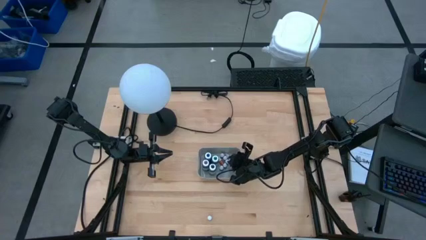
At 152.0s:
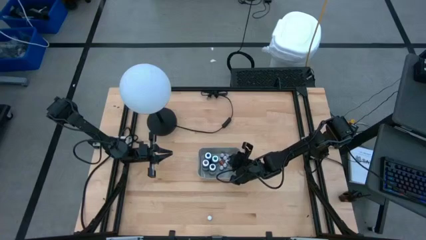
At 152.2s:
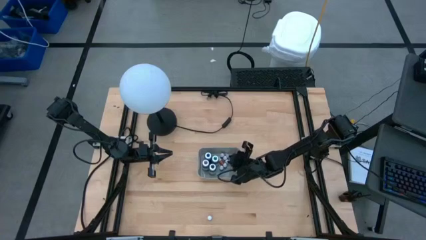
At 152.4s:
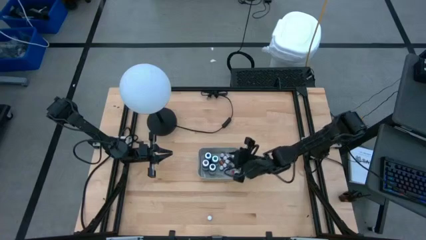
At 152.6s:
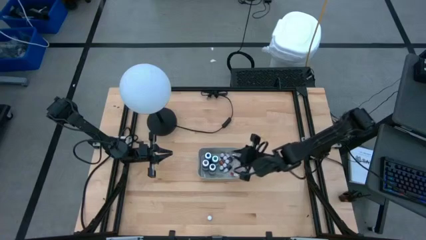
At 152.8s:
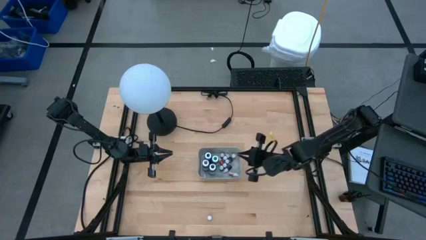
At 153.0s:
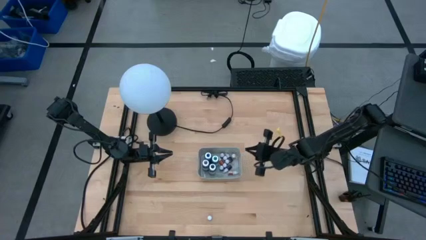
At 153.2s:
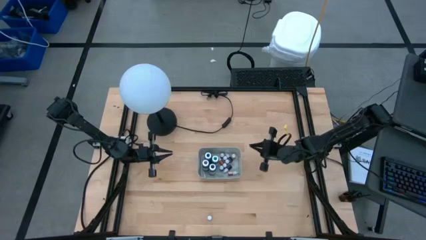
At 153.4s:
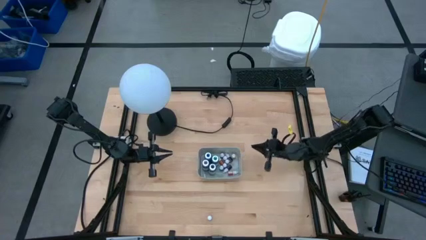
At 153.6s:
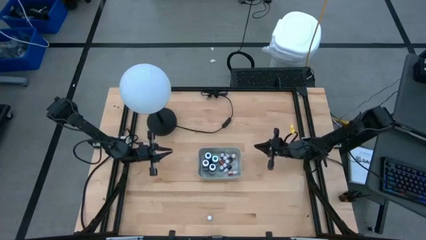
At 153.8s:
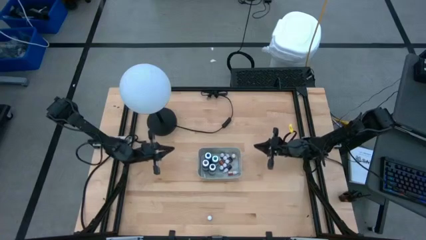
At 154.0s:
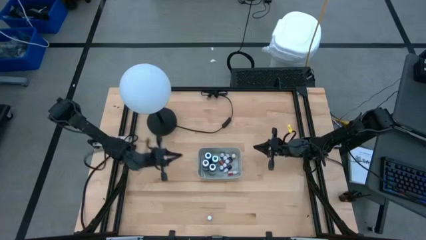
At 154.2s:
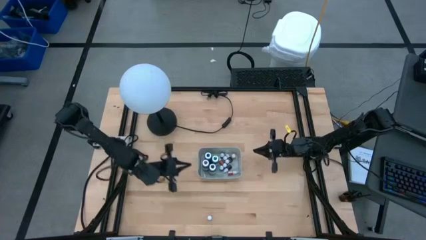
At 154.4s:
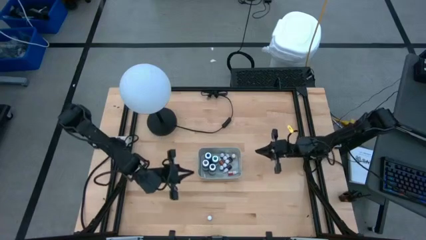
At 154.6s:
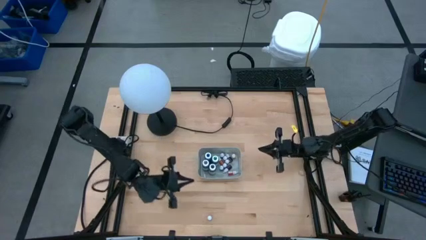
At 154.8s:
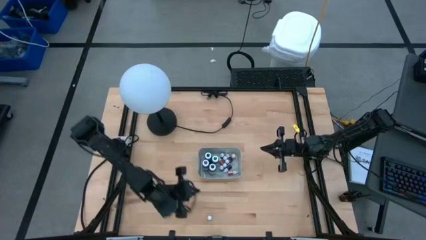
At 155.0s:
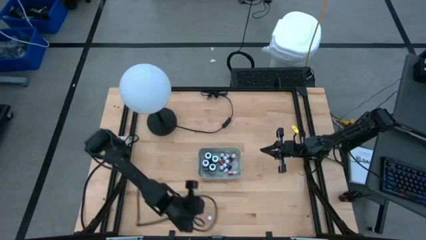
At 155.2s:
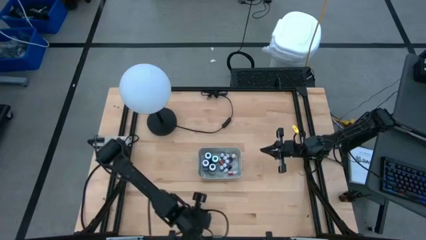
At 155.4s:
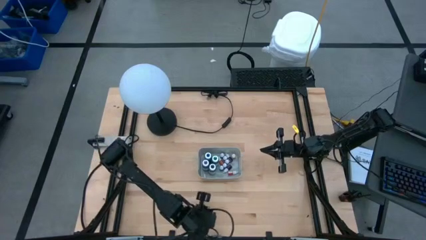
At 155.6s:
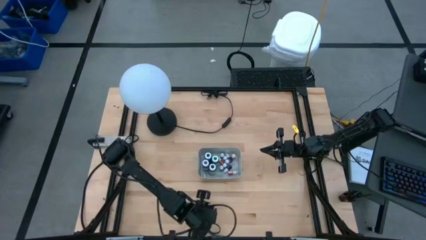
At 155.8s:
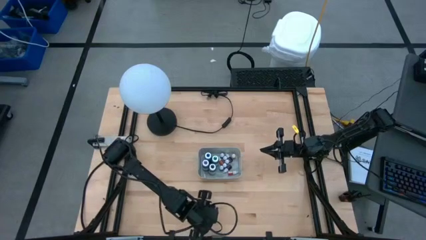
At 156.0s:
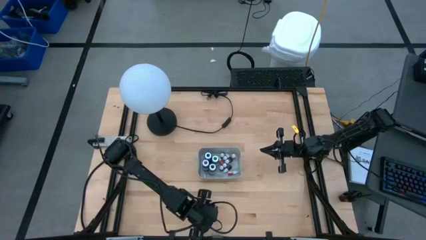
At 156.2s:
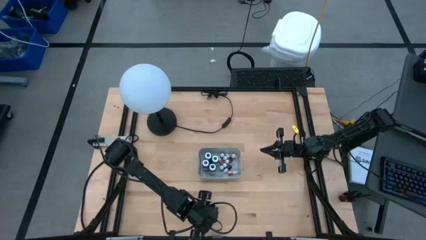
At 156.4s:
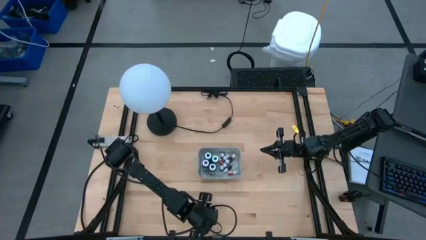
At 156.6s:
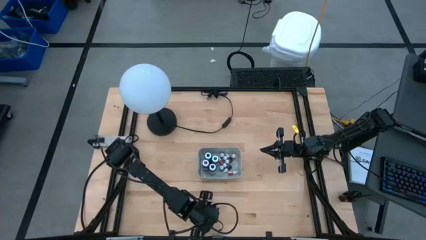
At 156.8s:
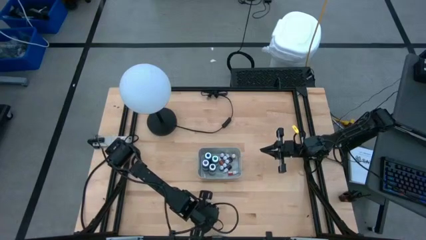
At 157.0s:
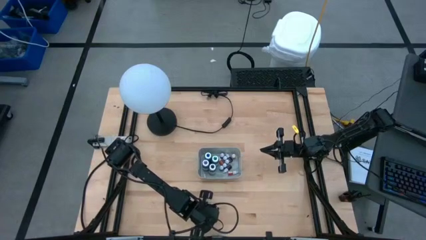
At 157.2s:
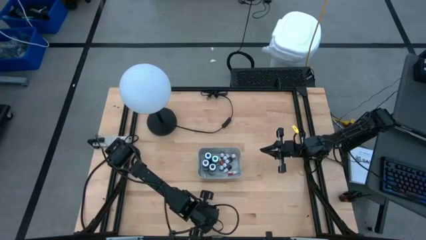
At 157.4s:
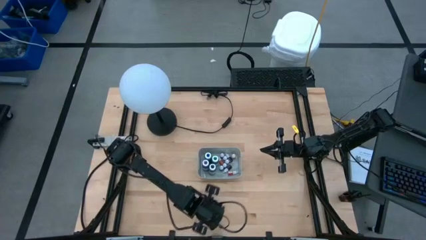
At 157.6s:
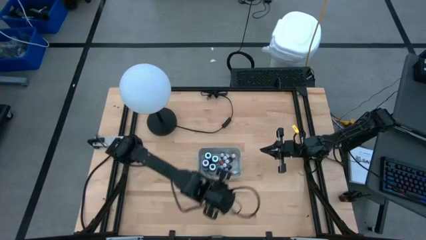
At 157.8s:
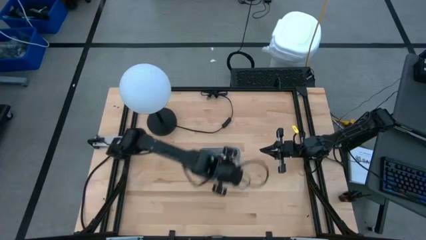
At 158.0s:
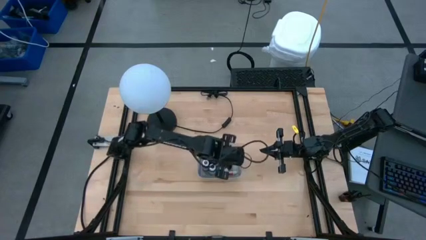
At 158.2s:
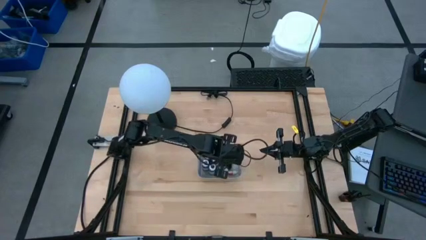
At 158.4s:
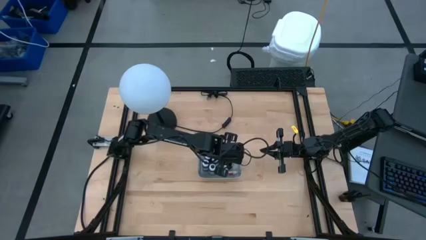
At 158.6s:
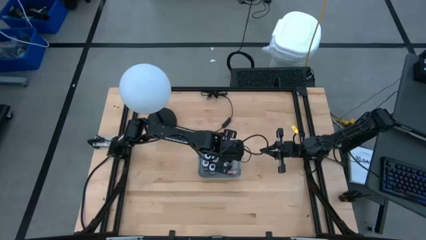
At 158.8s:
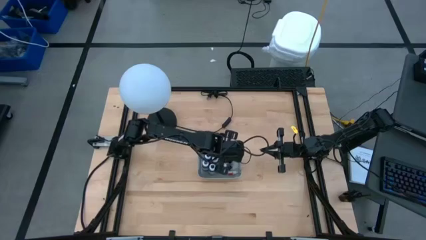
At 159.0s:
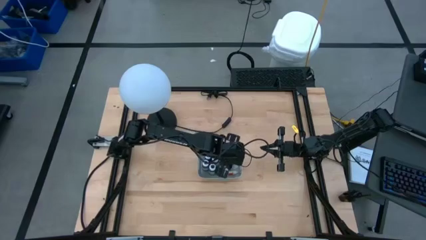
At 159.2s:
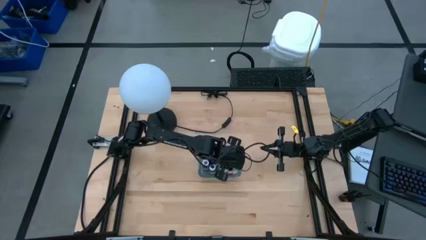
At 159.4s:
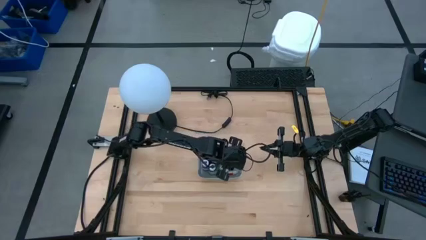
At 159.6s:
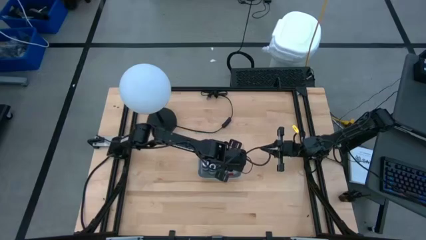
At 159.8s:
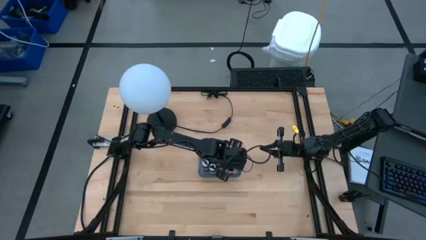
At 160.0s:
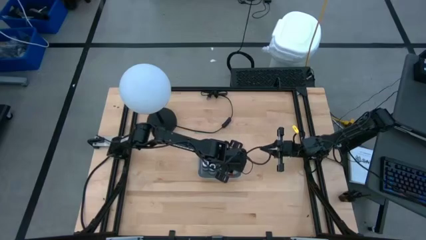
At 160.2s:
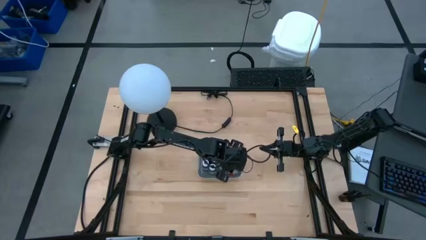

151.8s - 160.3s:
Task: Pick & Place food coloring
Put the small yellow food coloring bottle into the gray bin

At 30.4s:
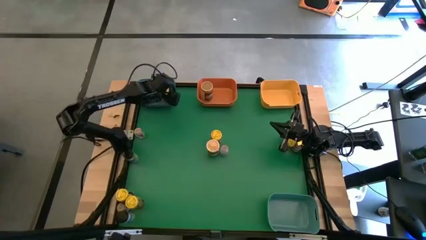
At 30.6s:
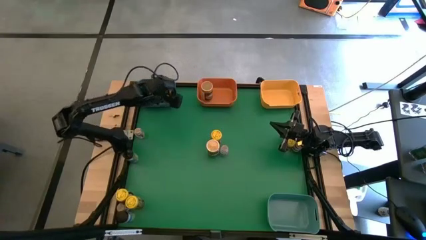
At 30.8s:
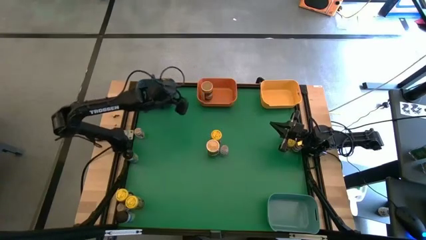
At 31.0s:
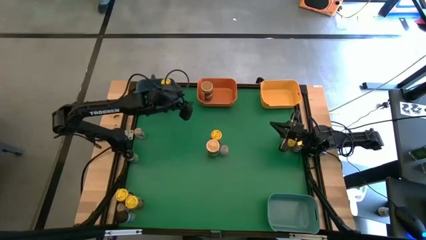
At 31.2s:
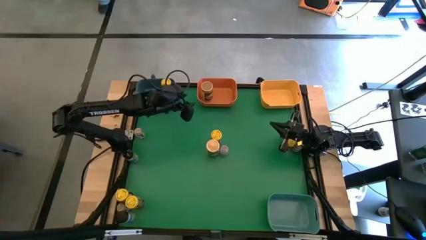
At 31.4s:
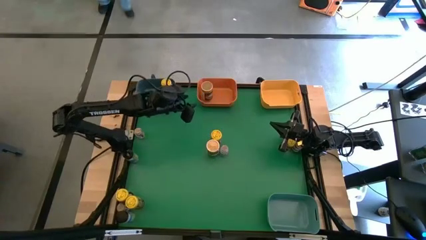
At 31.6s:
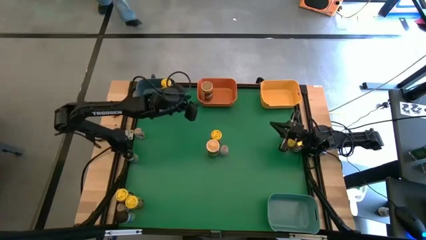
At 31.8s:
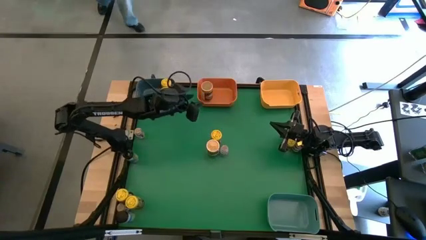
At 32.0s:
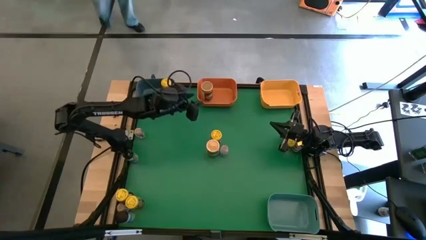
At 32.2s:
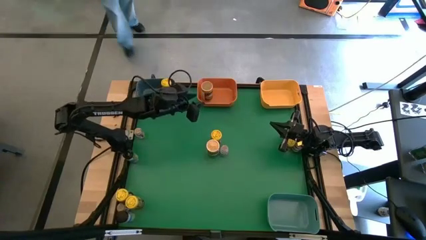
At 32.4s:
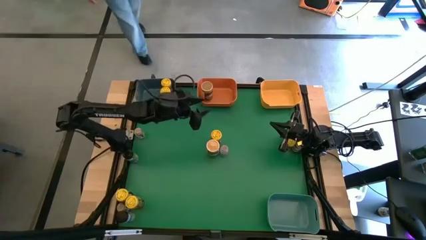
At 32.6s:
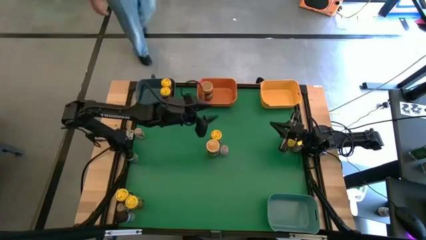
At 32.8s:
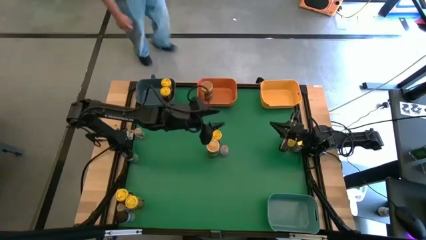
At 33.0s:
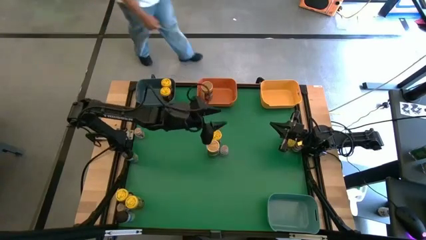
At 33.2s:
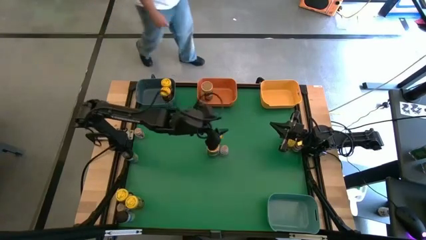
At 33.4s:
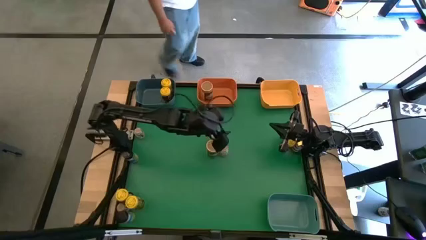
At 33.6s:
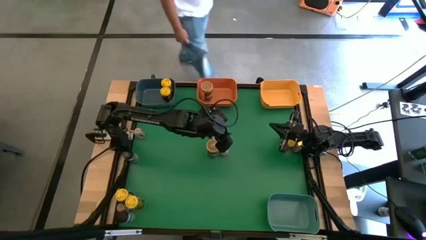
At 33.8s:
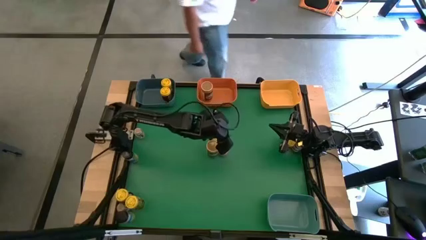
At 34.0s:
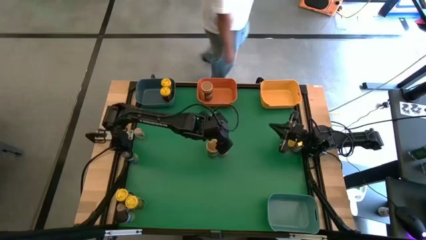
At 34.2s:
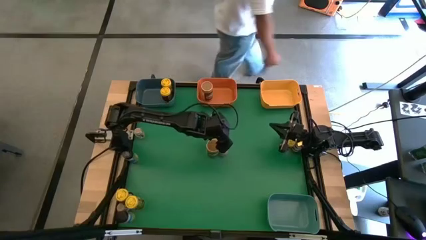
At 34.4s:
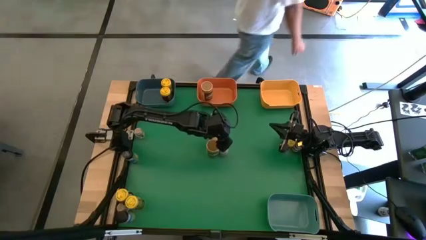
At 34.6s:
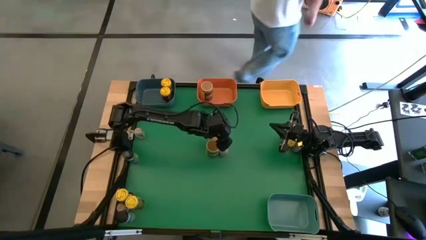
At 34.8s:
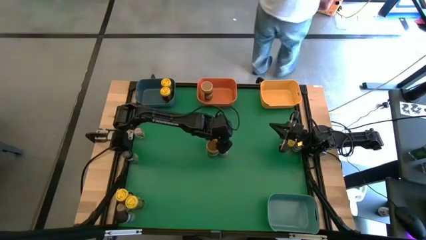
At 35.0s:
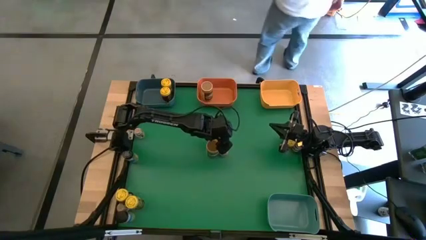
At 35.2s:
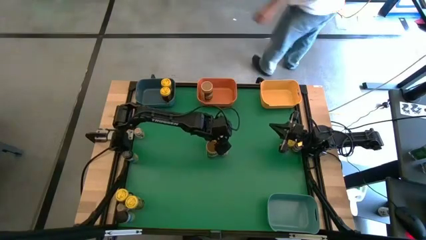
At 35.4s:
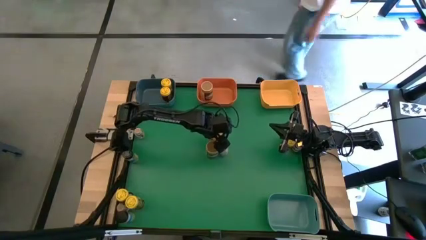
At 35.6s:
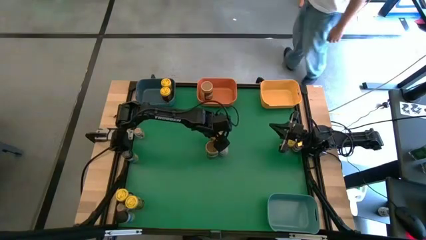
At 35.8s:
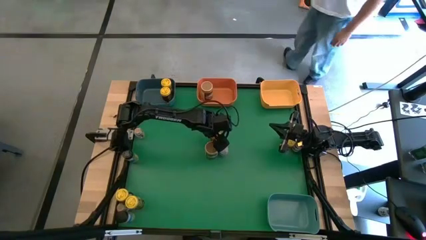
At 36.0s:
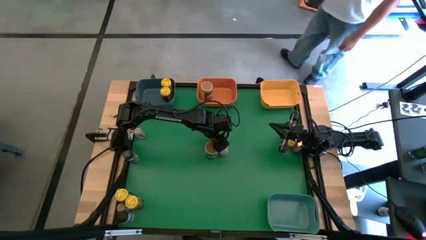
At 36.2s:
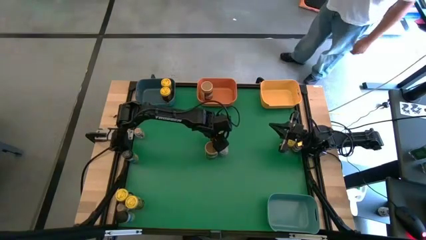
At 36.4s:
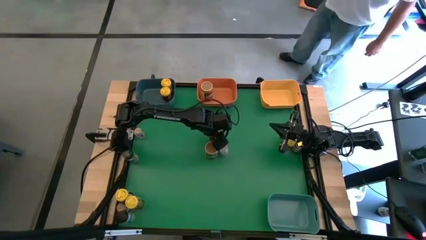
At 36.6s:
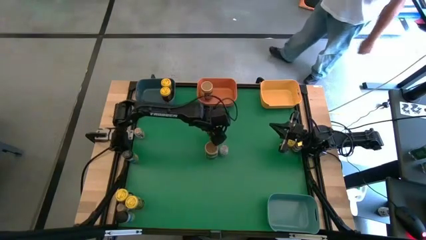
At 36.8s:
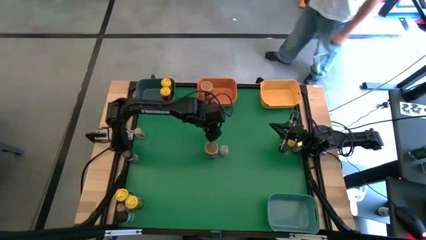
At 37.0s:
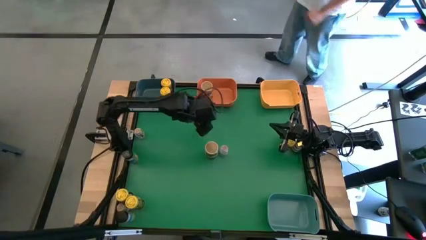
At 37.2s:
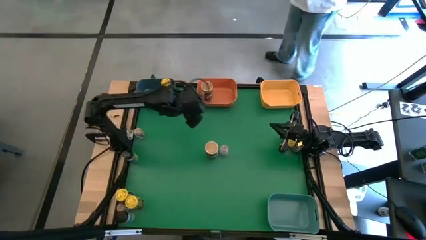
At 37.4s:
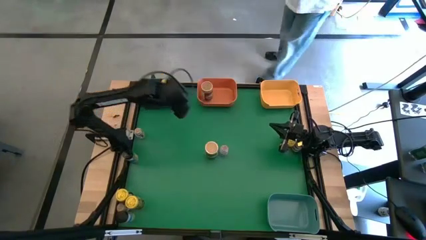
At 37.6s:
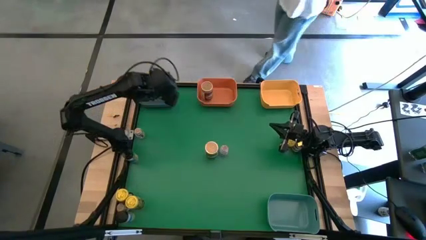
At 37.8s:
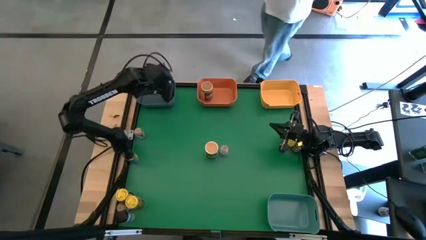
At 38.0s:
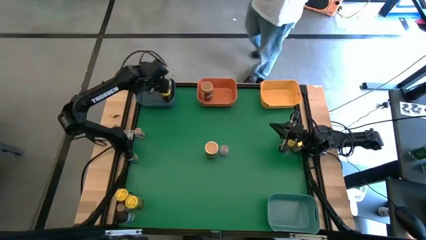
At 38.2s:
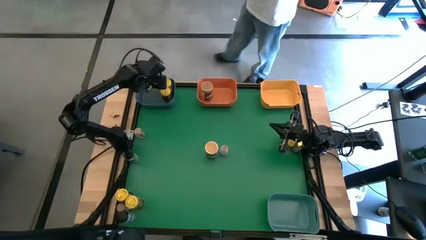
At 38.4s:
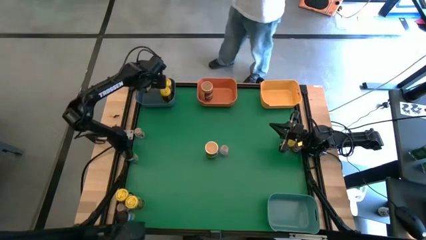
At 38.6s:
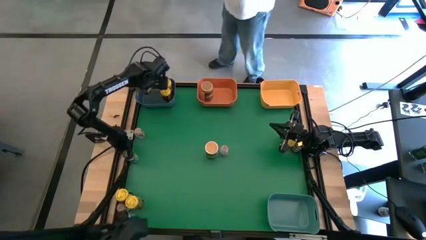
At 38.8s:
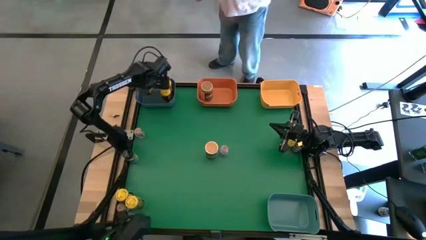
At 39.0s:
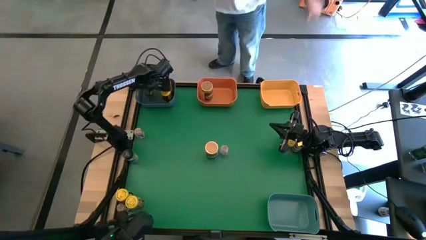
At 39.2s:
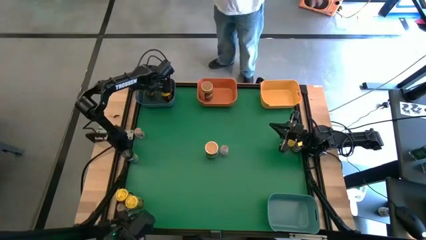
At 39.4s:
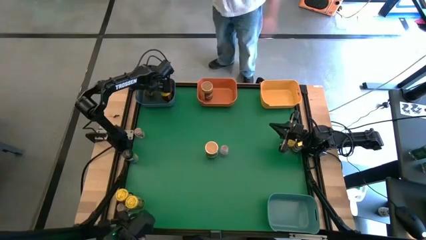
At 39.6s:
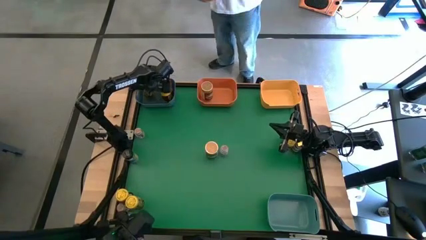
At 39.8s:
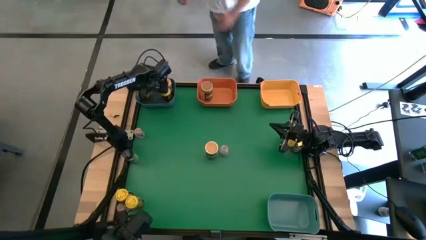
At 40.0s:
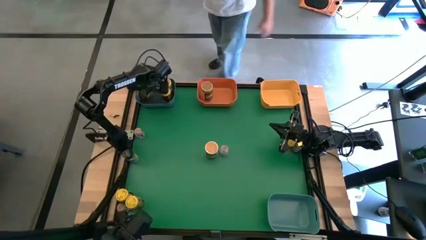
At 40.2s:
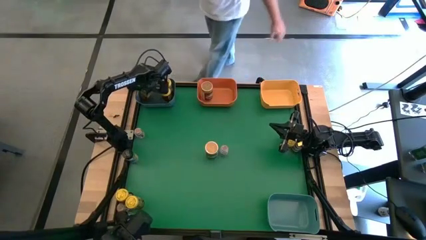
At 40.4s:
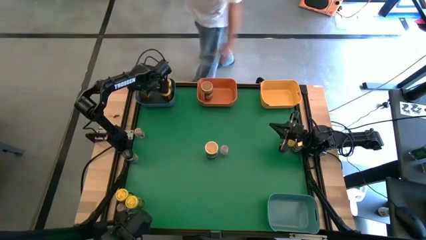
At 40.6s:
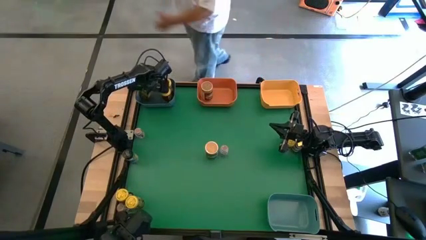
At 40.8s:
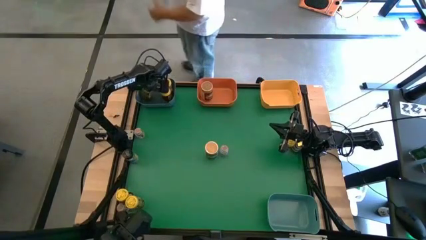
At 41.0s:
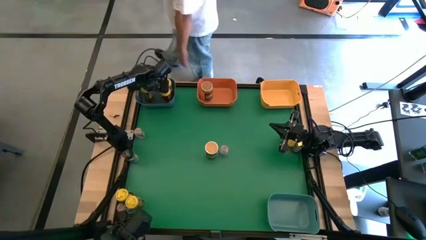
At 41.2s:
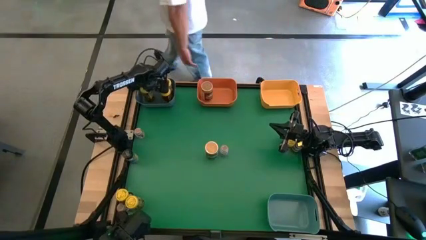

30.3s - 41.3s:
Task: Sort spices by type
Put the yellow seasoning bottle into the blue bin
